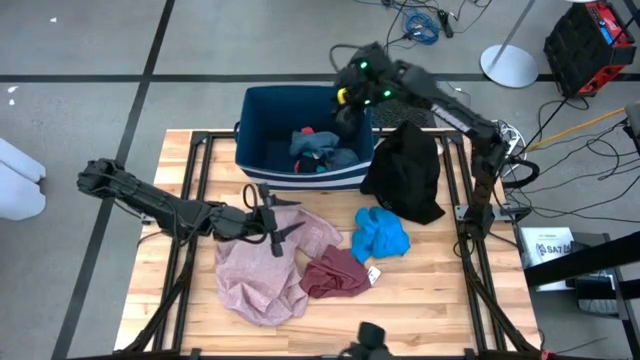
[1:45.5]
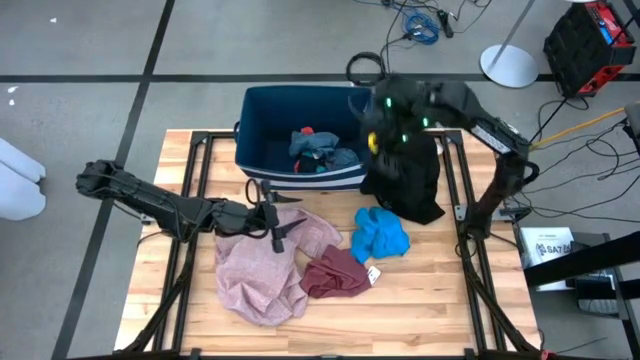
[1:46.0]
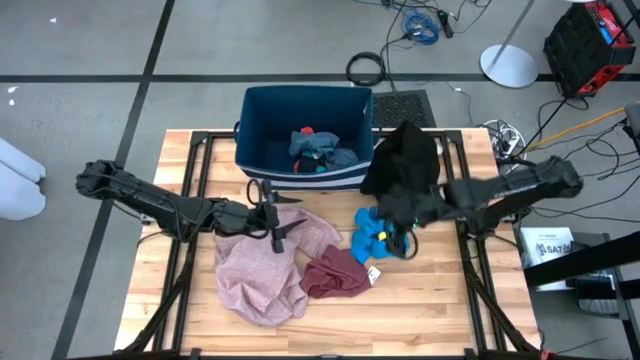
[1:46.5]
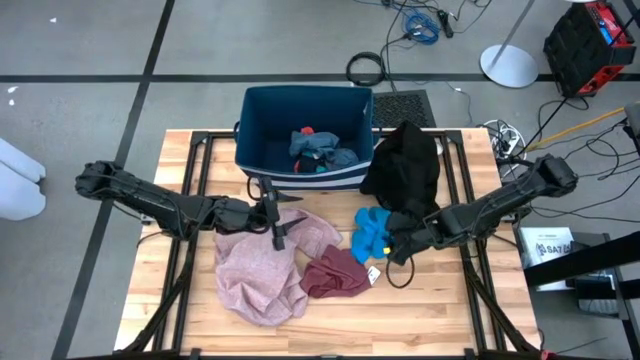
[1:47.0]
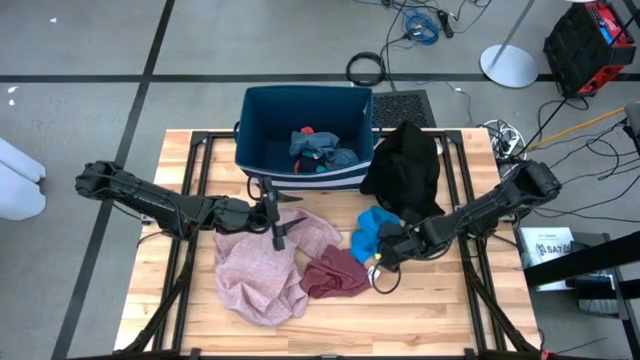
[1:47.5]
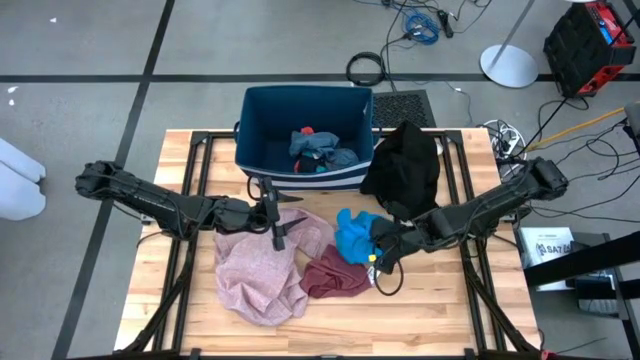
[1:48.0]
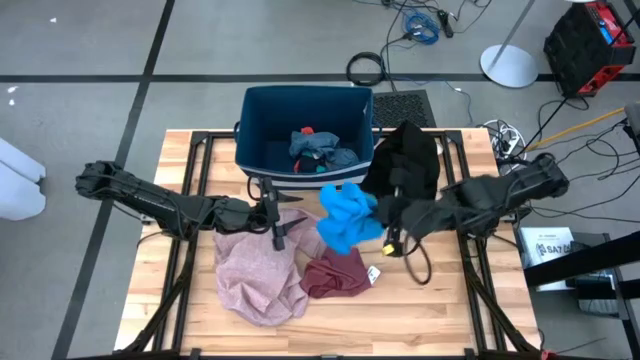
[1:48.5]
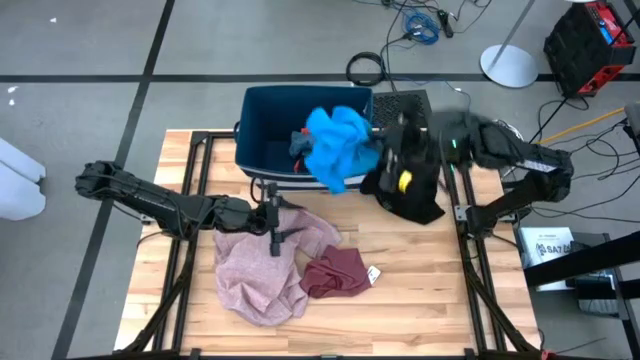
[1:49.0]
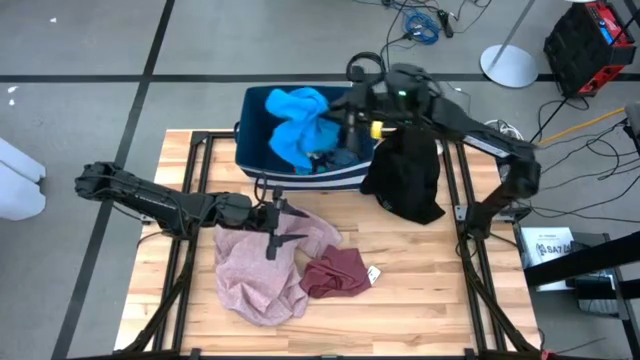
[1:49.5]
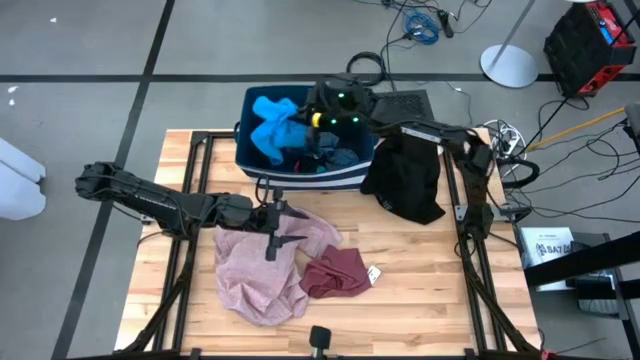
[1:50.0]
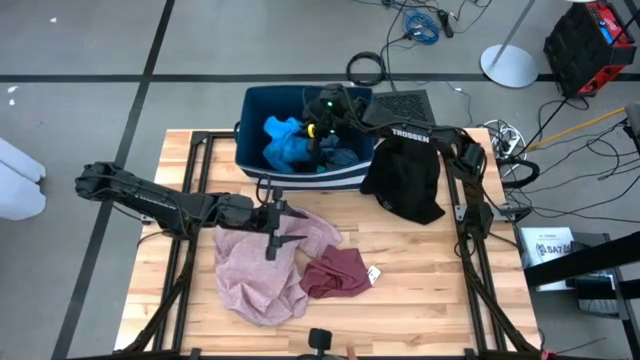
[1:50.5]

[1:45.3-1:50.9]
Task: Sort clothes
Put the blue short into the blue laundry organizer

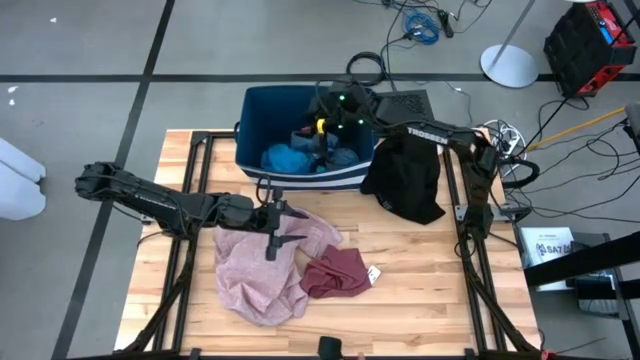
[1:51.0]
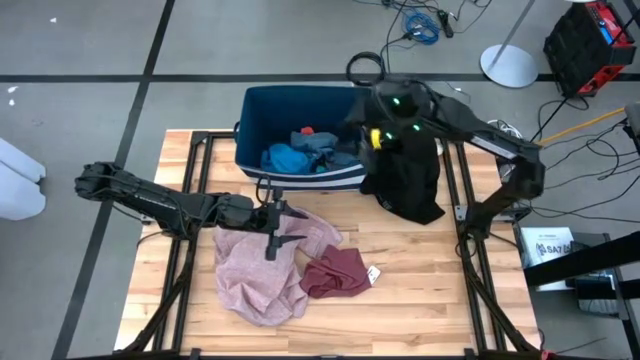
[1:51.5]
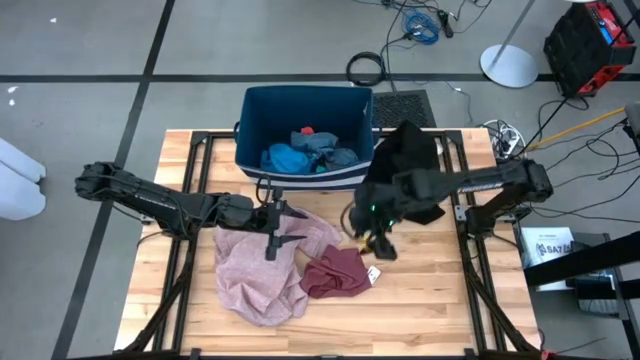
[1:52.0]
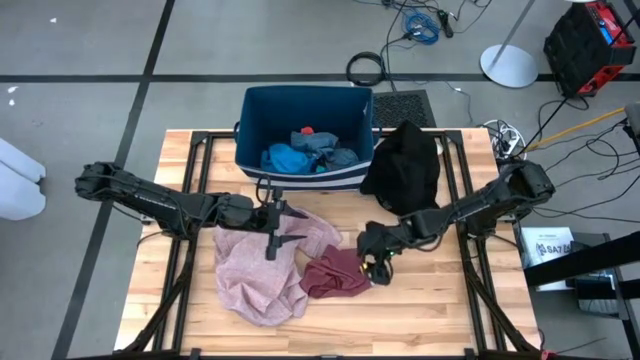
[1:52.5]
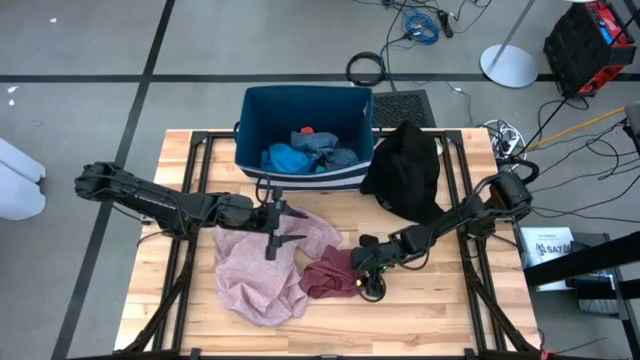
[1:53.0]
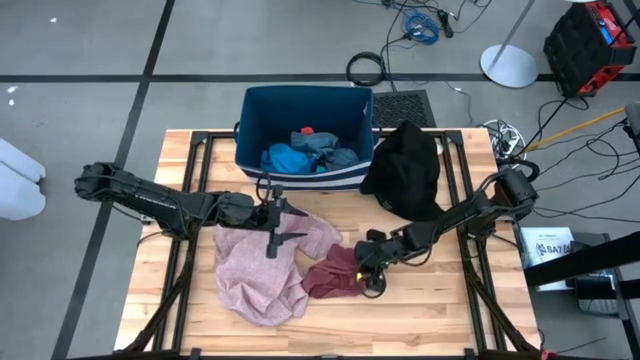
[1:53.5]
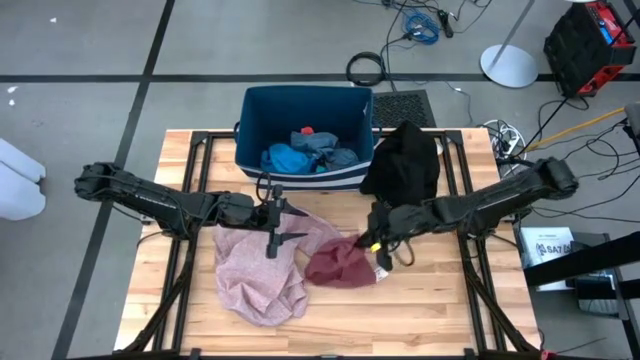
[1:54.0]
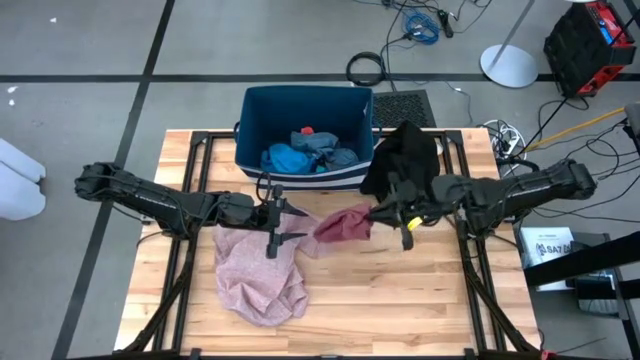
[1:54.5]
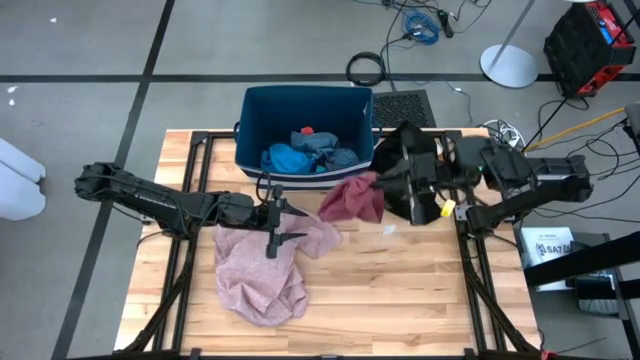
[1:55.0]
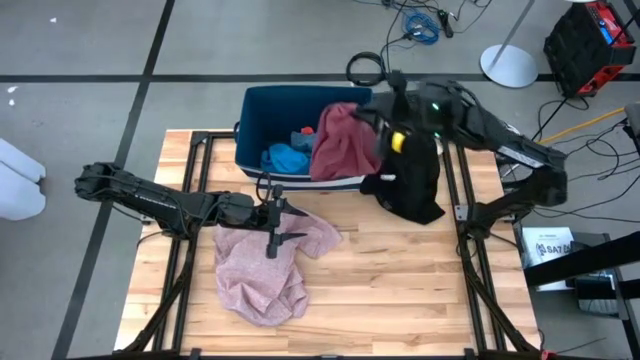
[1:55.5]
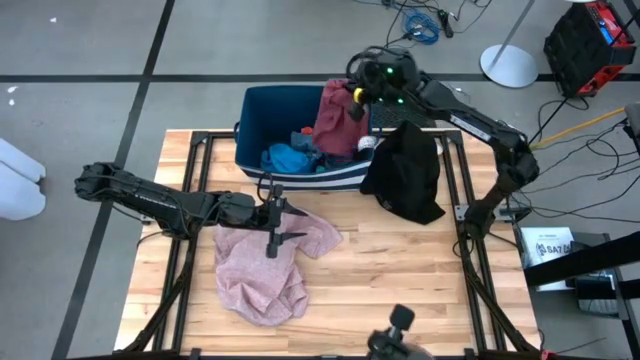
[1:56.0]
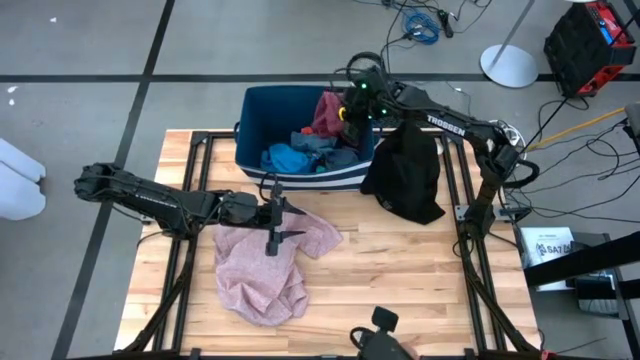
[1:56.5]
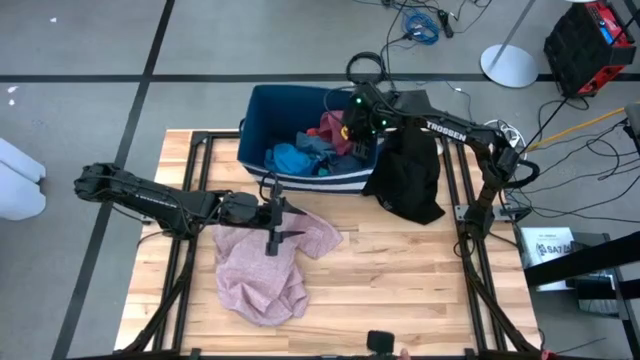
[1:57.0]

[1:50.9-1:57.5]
Put the pink underwear into the blue laundry organizer

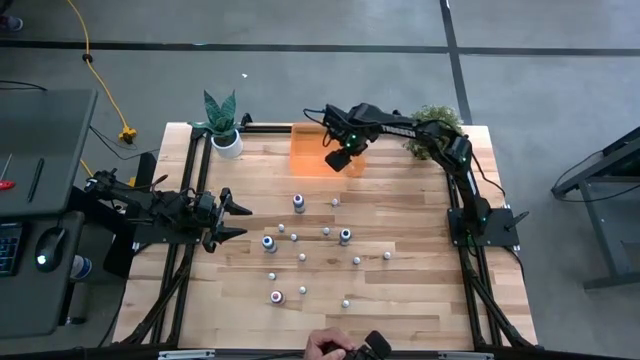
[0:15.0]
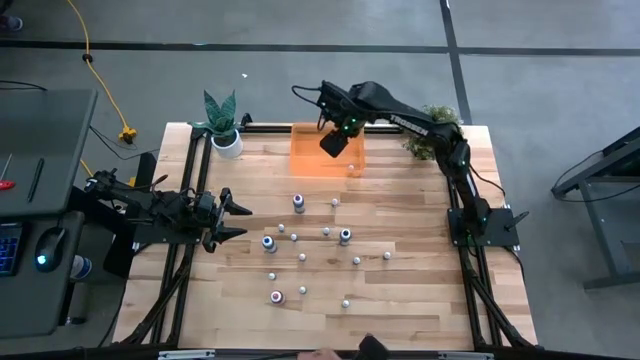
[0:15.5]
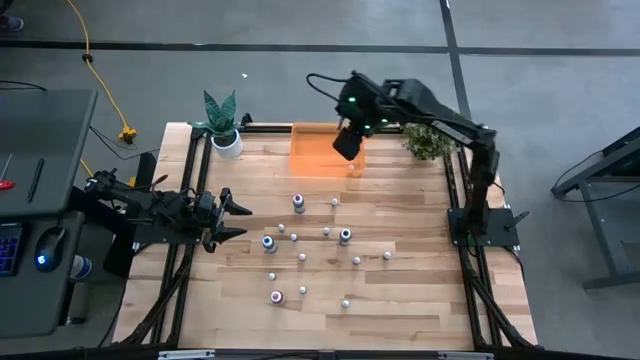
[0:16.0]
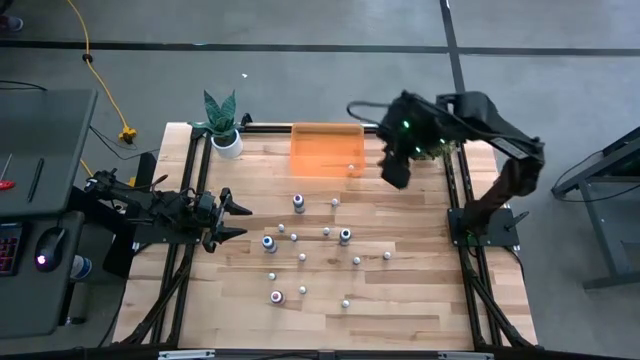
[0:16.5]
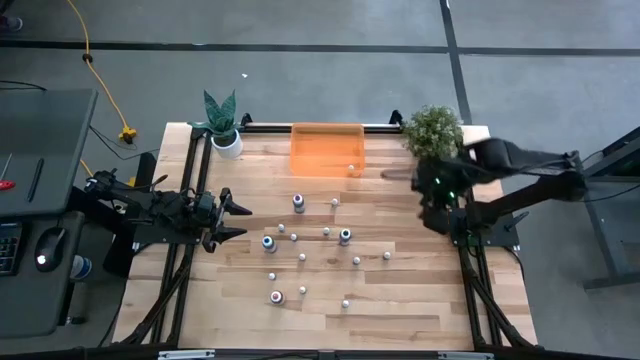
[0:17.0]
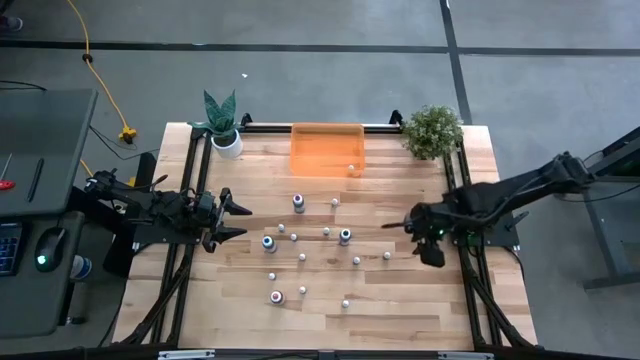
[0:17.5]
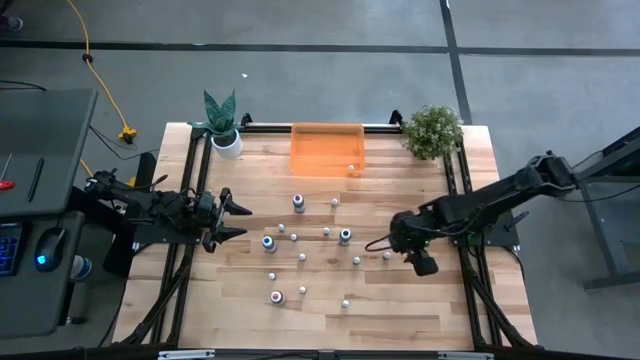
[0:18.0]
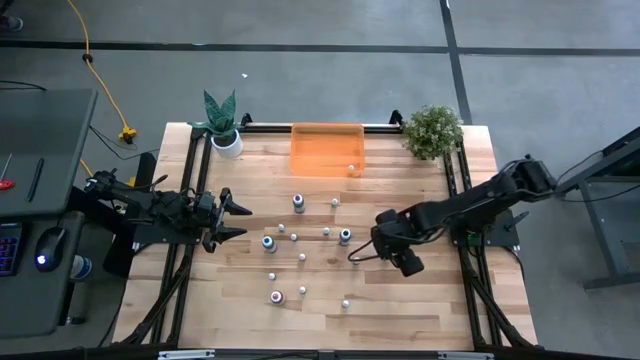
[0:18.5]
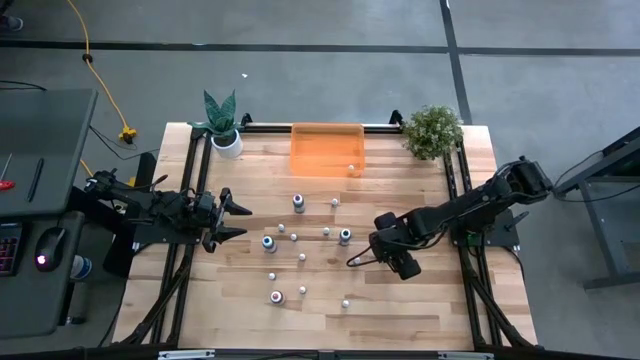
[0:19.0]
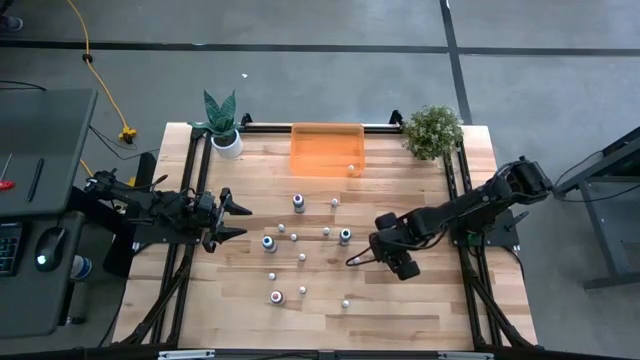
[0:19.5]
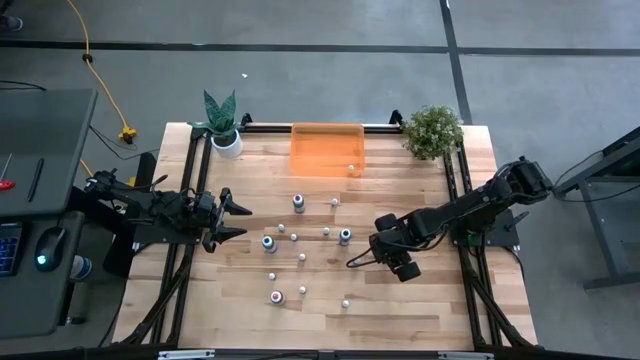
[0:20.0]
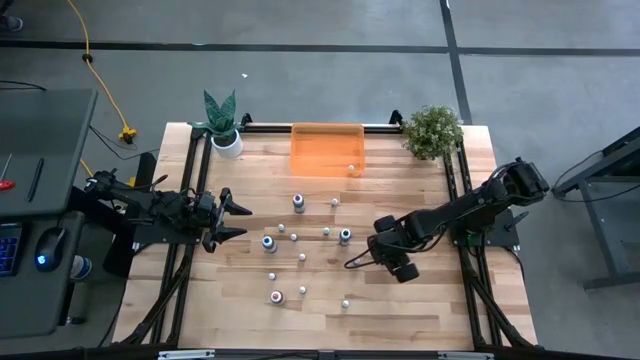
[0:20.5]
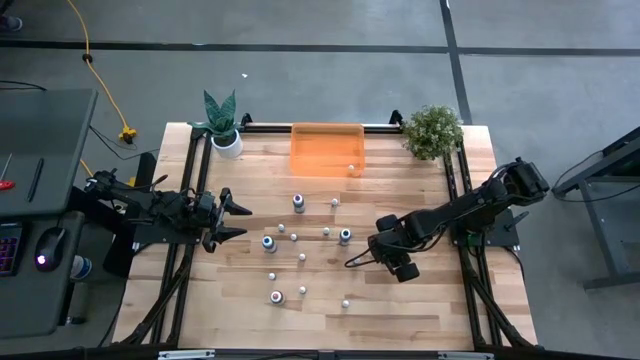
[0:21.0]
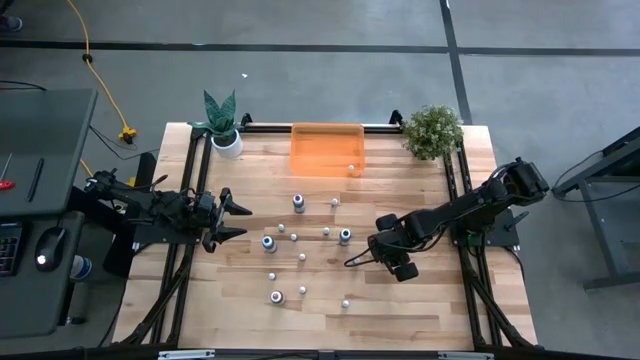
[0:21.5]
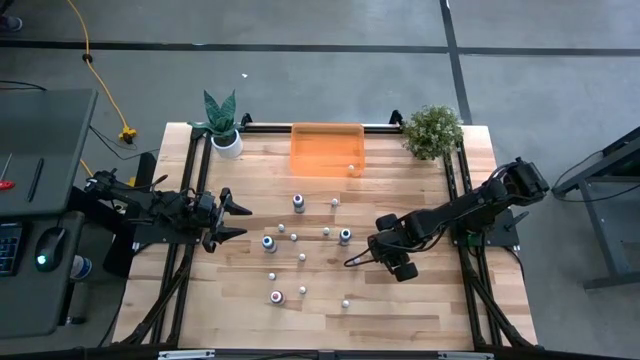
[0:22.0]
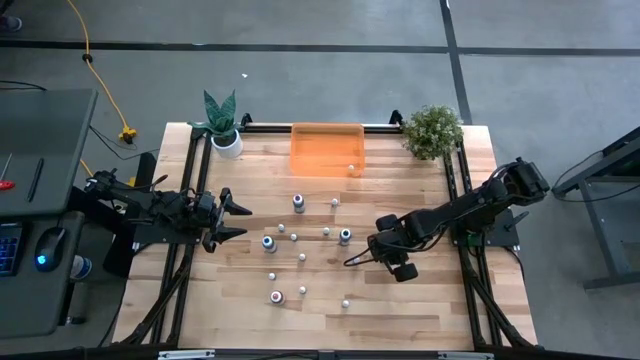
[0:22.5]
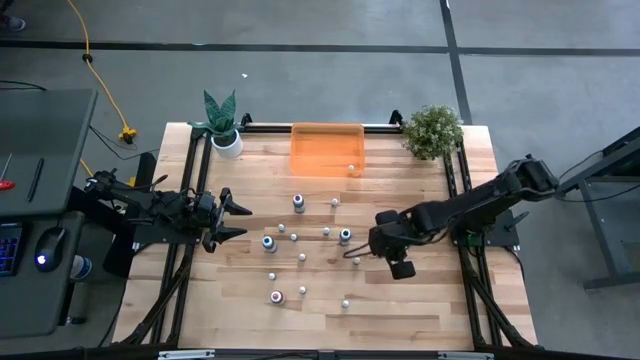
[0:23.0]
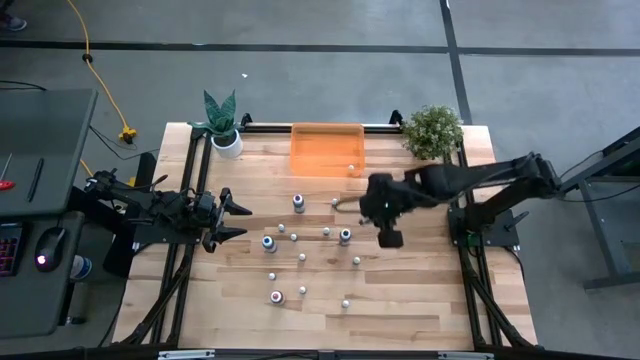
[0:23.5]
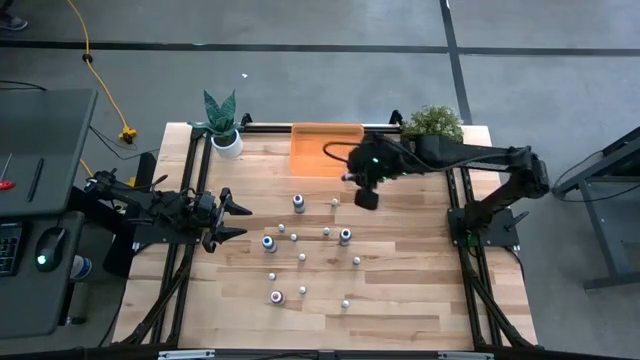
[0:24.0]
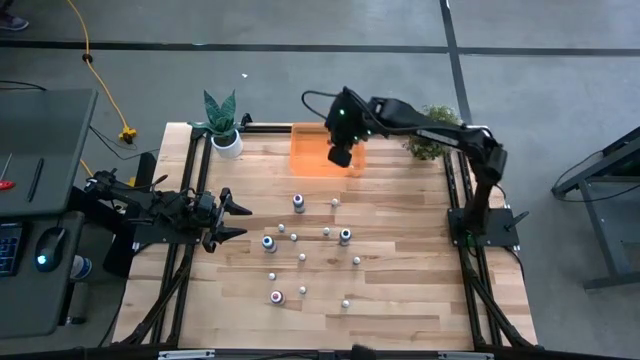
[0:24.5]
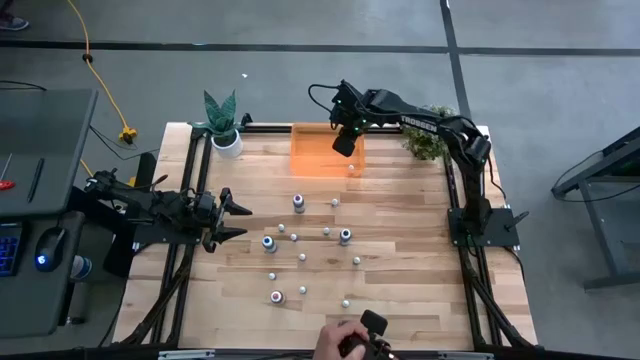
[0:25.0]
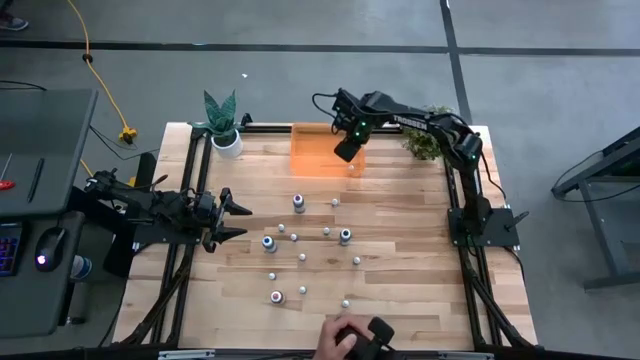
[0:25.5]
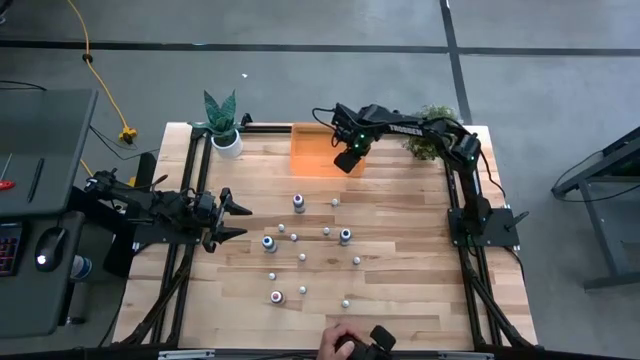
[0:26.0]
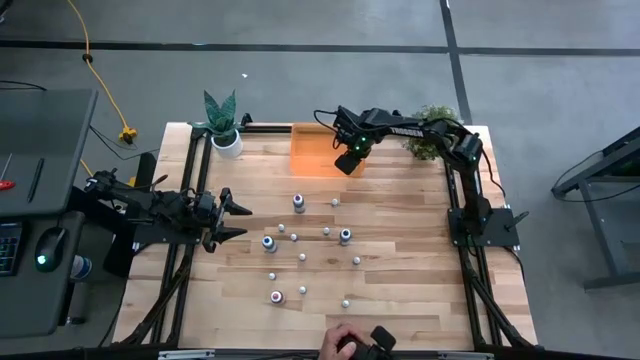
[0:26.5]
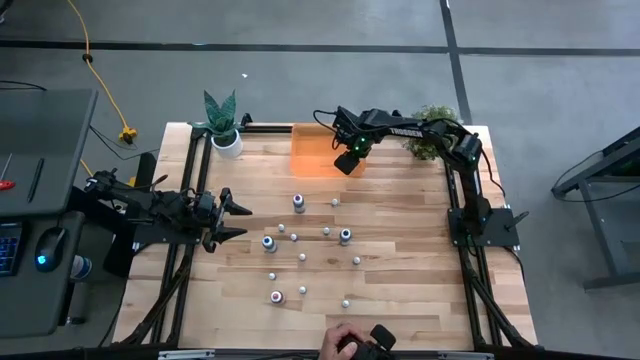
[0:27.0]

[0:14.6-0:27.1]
Task: Pick & Place food coloring
Put the small black food coloring bottle into the orange bin
